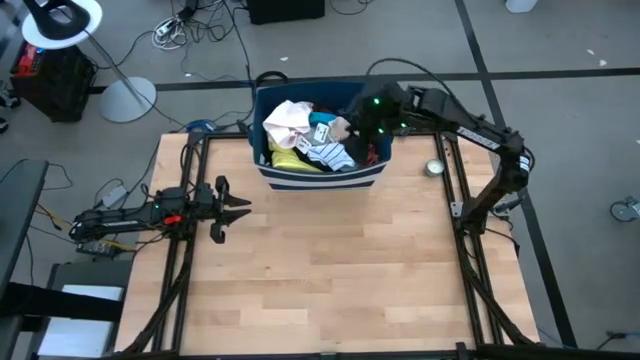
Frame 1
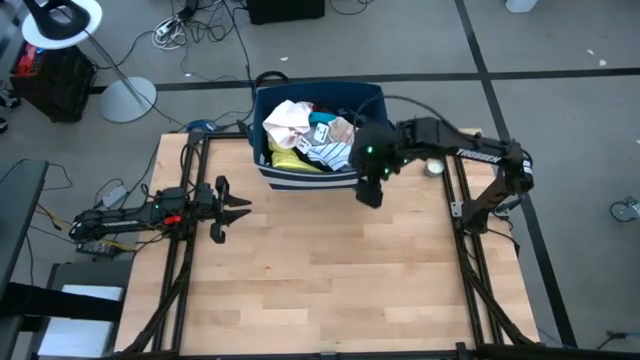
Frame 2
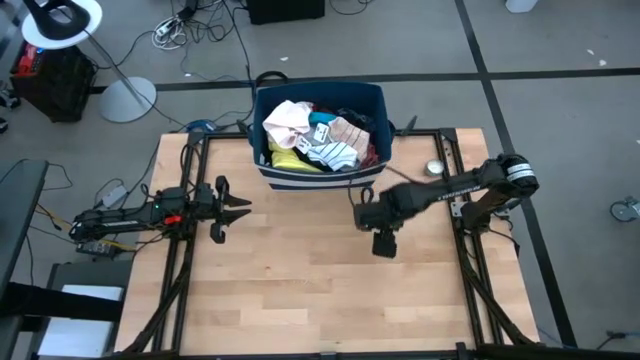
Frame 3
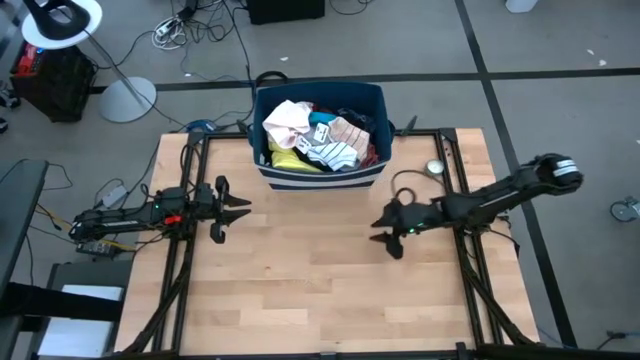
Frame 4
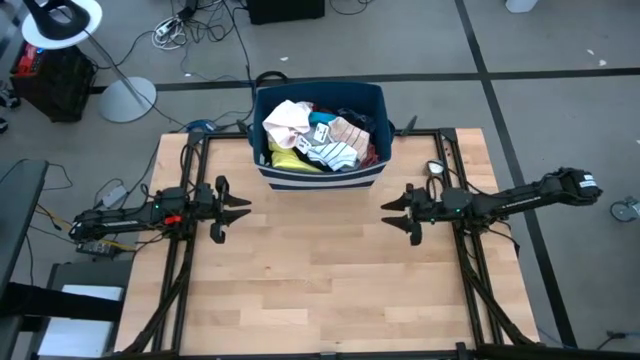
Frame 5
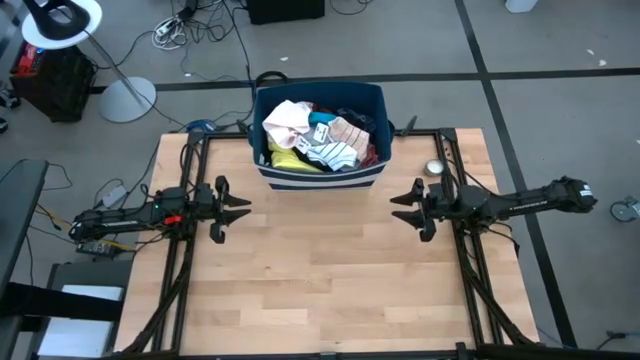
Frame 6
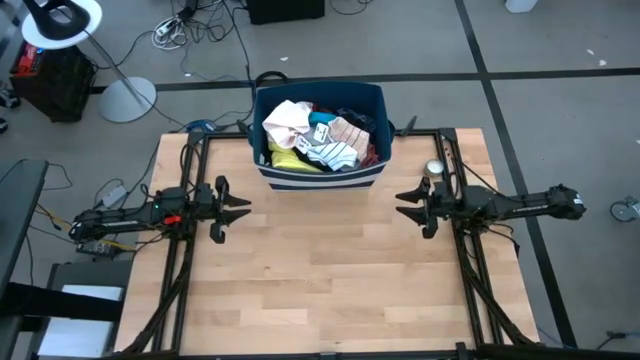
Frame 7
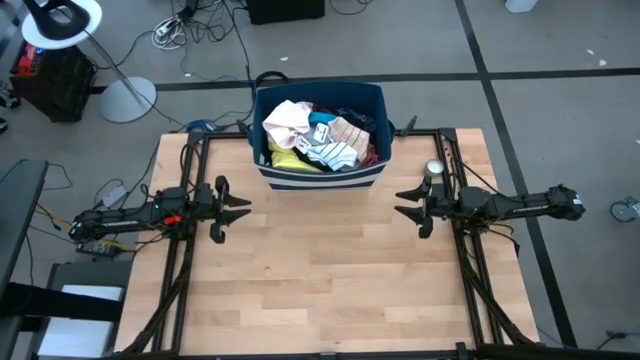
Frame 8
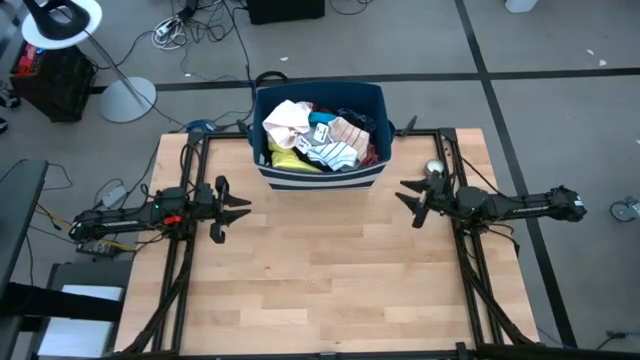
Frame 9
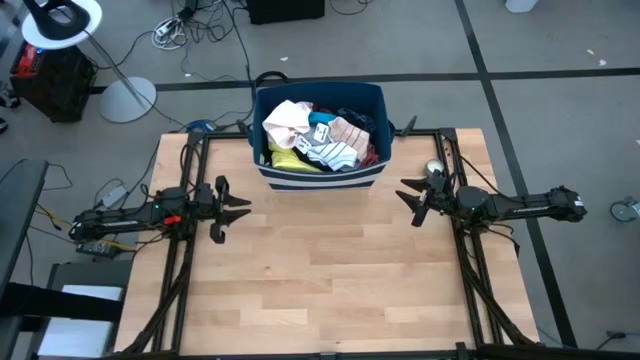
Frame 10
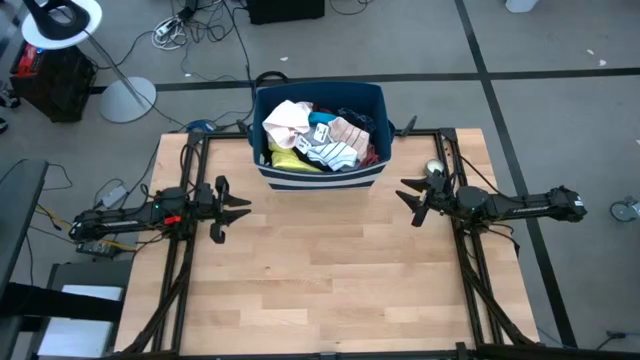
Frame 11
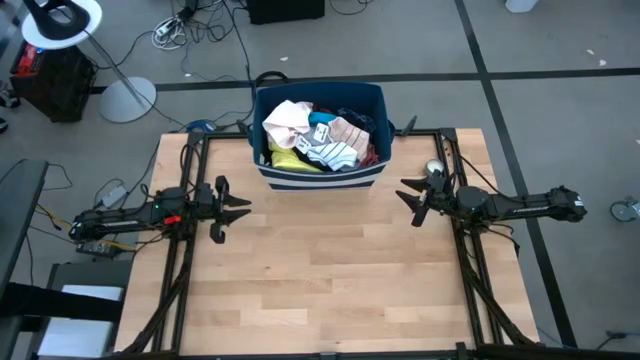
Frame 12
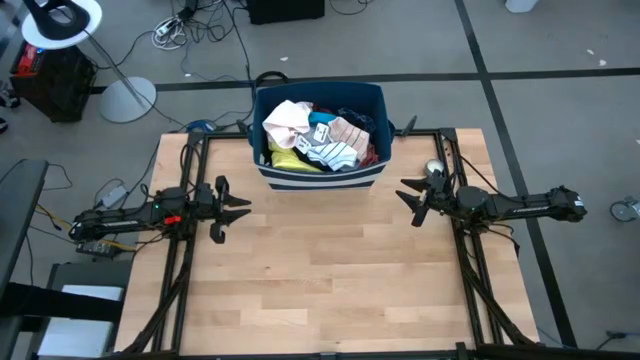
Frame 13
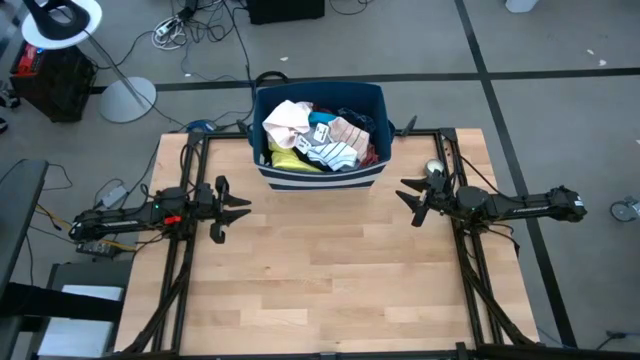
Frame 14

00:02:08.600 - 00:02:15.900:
Task: Sort clothes
Return to Home Position

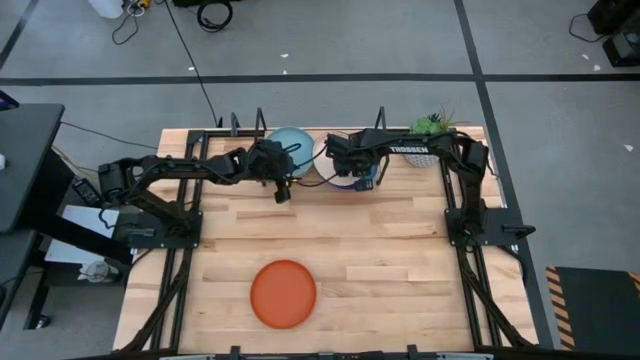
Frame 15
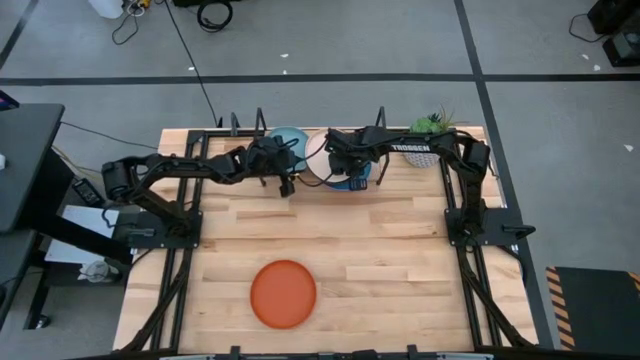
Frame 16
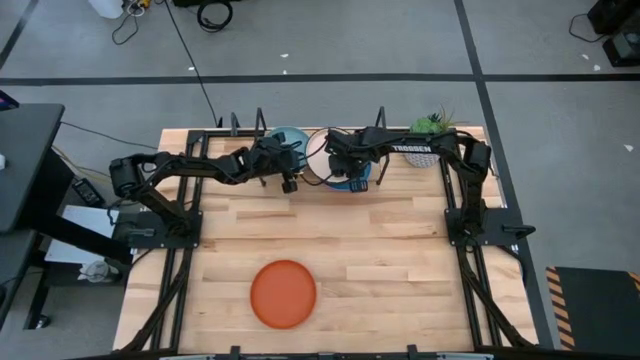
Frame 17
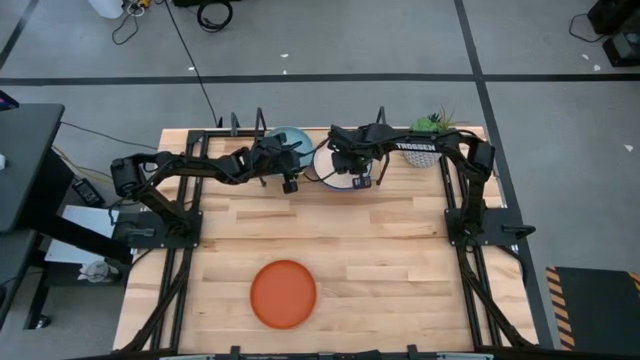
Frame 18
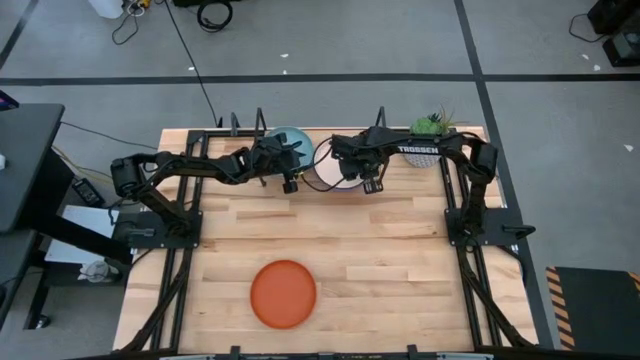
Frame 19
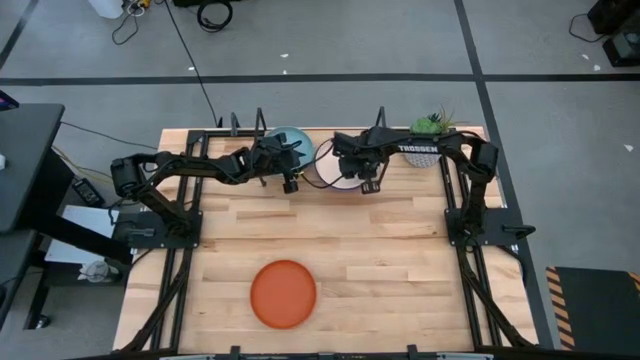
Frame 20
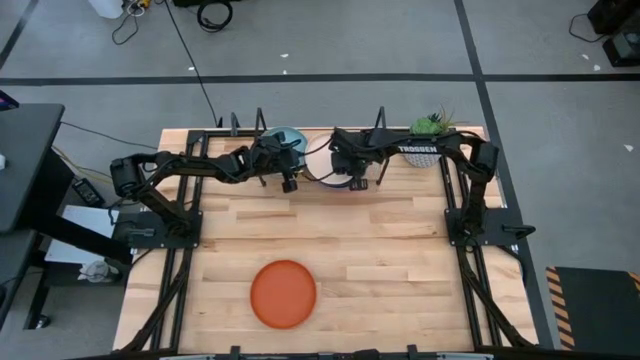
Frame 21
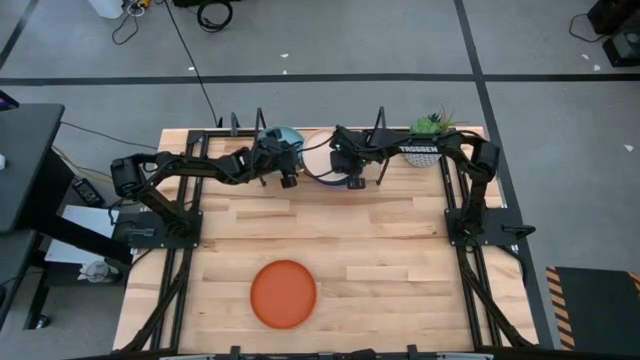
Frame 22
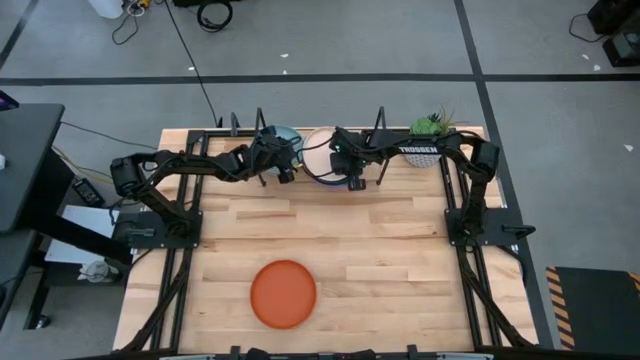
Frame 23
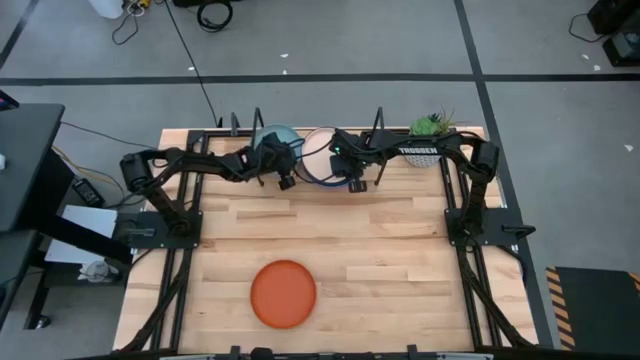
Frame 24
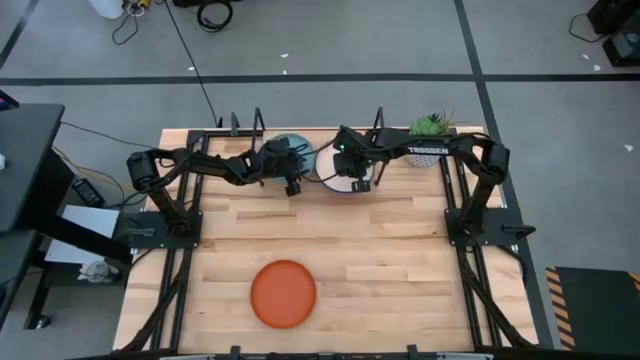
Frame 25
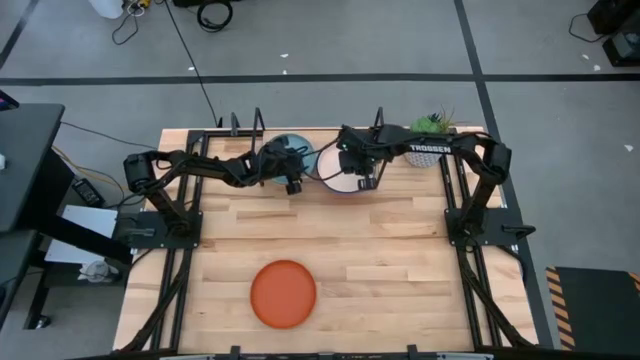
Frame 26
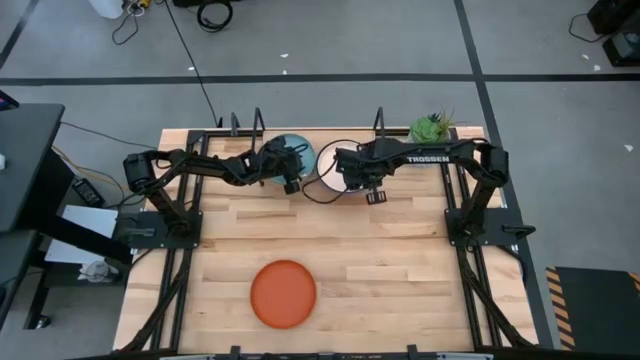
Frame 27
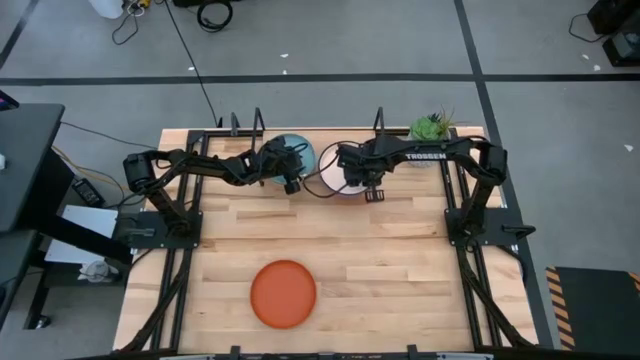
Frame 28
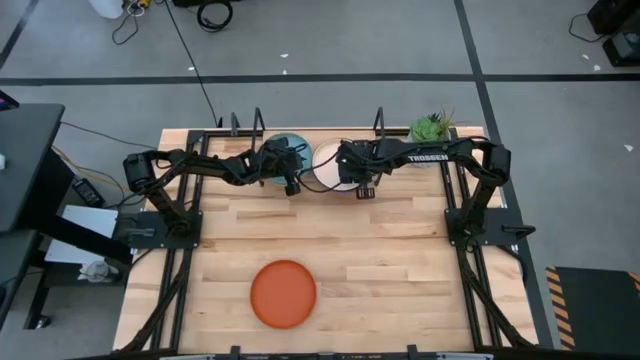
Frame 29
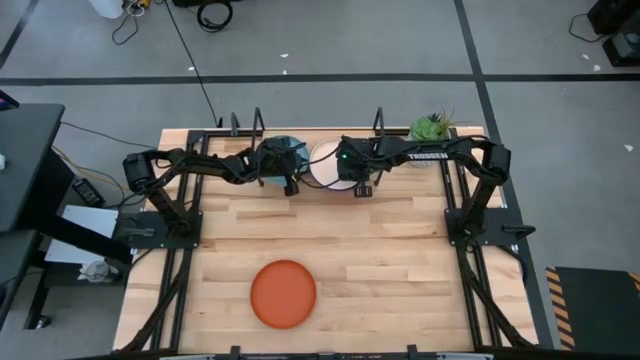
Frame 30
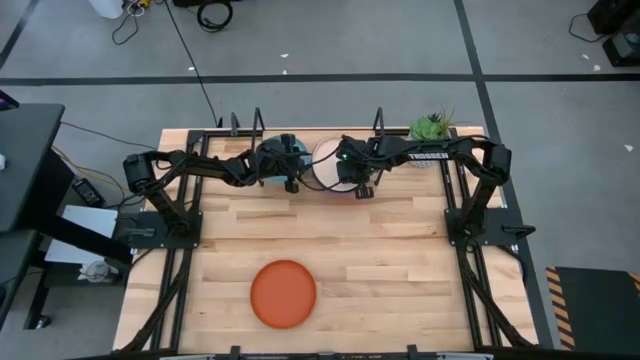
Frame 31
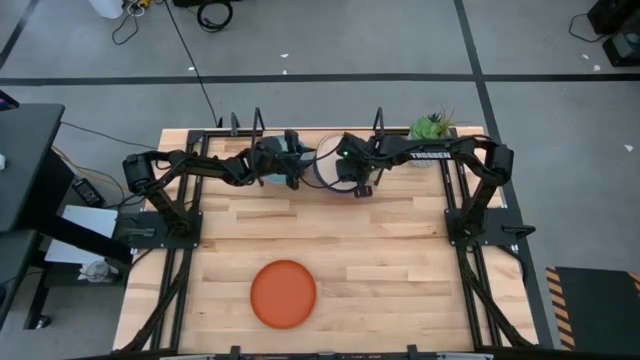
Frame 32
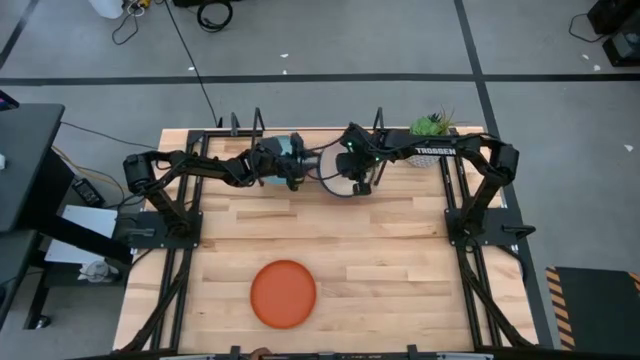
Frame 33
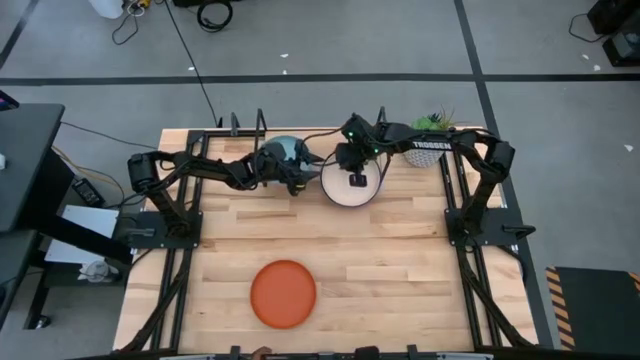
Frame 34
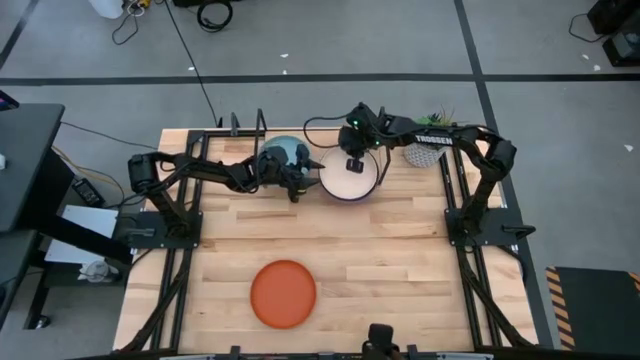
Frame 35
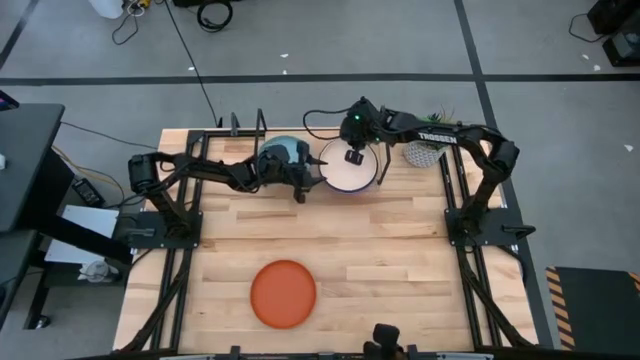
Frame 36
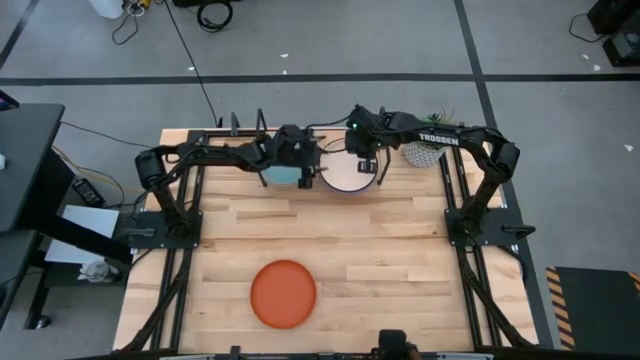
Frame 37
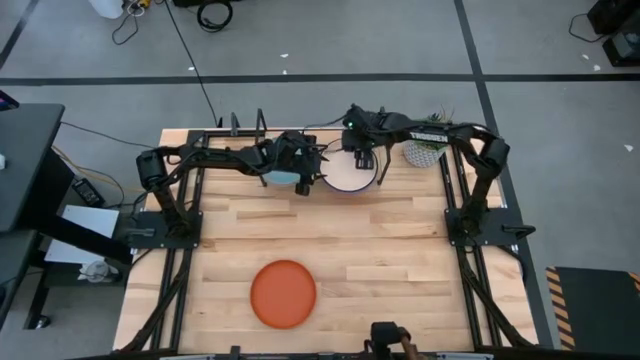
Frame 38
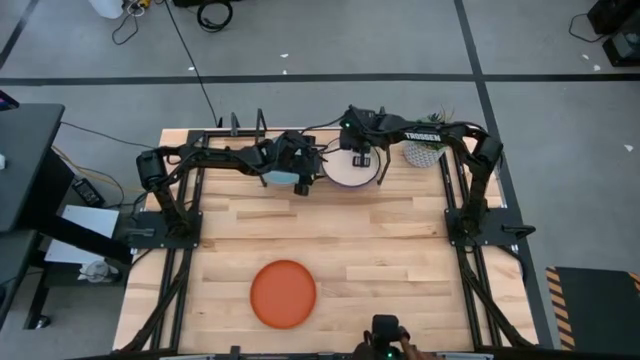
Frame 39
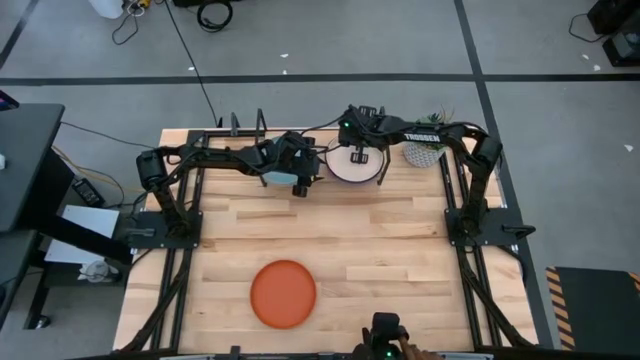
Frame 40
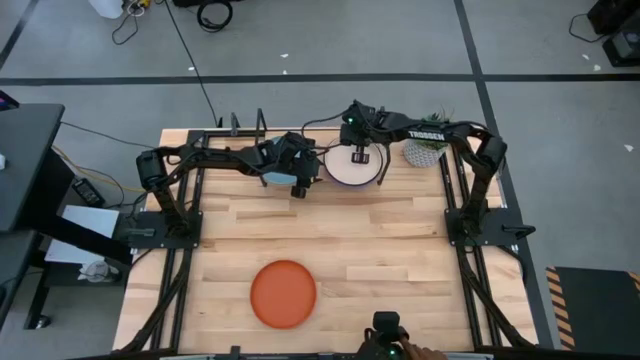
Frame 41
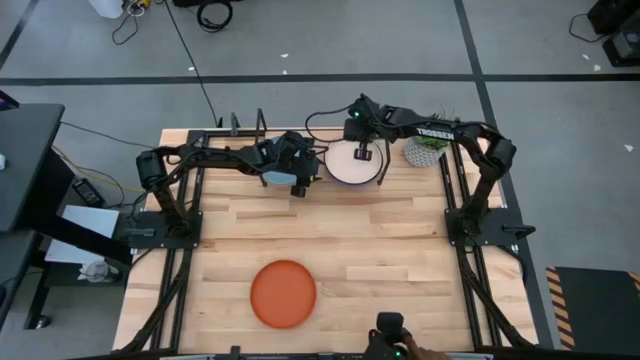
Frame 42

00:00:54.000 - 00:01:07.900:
Task: Place and stack plates onto a shelf
Stack the light brown plate on top of the dark green plate on the shelf
